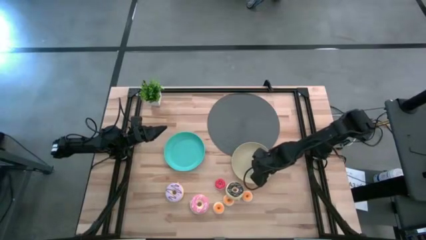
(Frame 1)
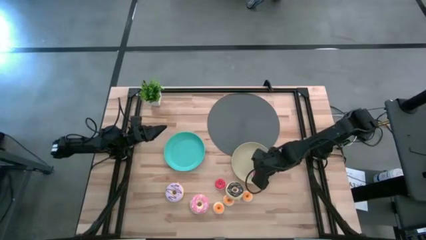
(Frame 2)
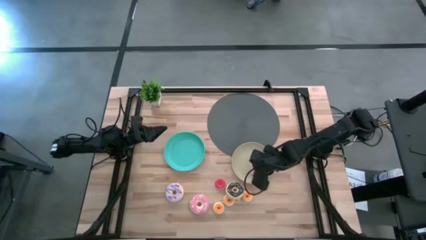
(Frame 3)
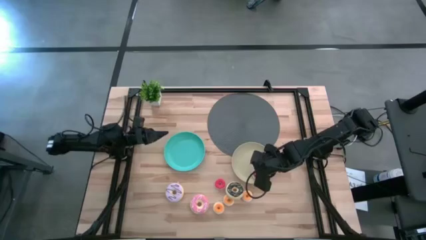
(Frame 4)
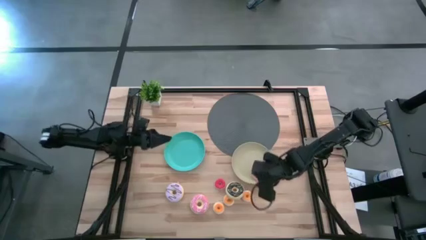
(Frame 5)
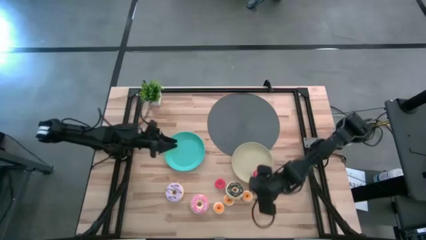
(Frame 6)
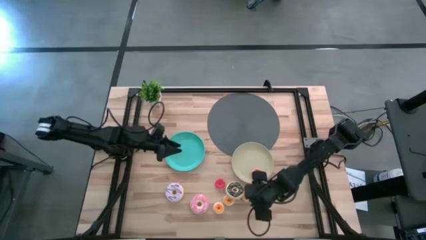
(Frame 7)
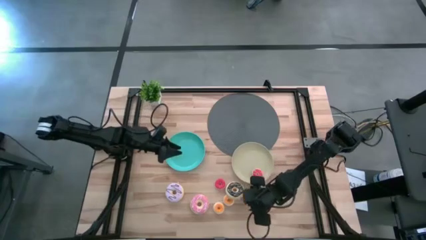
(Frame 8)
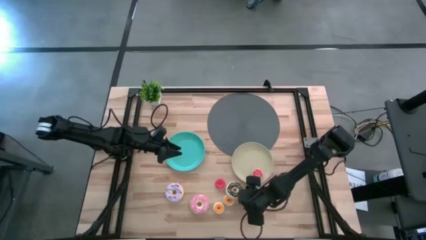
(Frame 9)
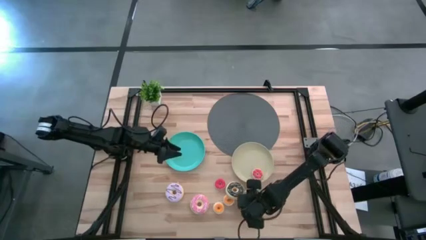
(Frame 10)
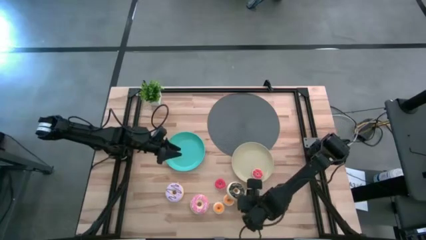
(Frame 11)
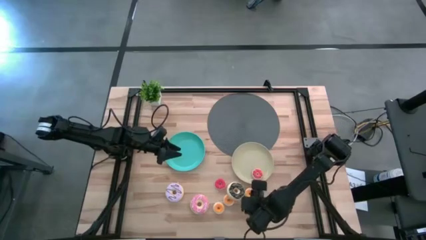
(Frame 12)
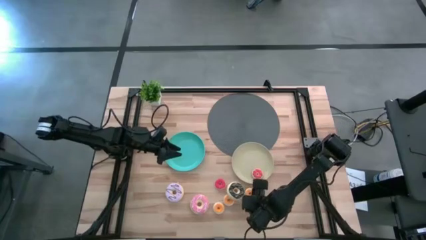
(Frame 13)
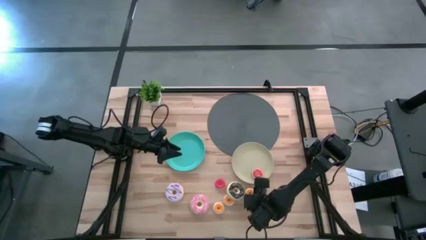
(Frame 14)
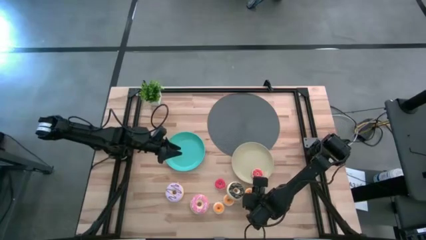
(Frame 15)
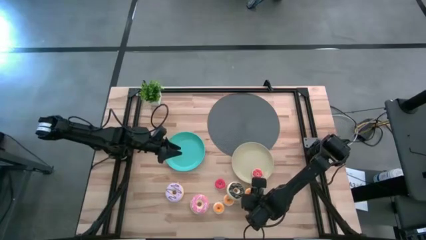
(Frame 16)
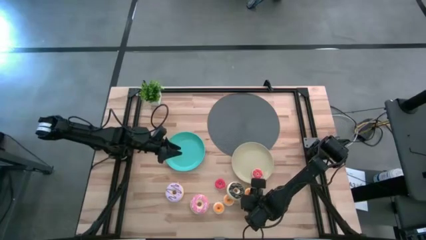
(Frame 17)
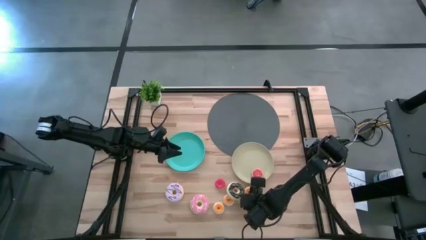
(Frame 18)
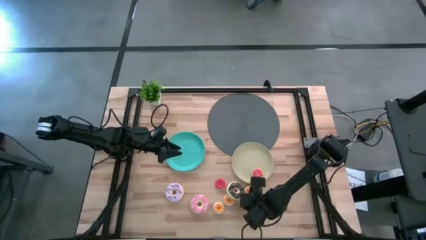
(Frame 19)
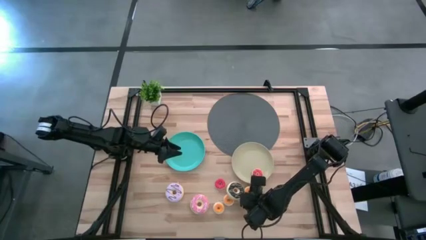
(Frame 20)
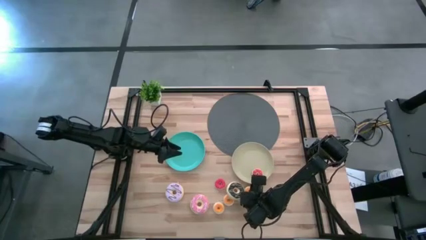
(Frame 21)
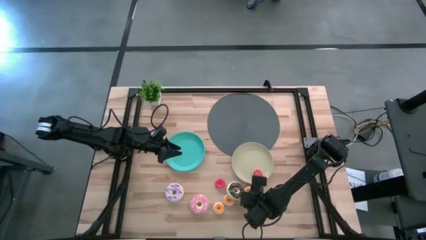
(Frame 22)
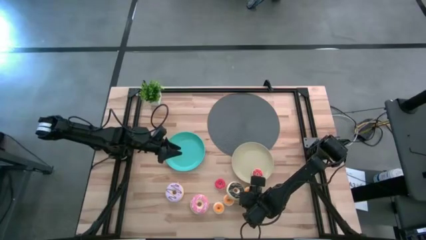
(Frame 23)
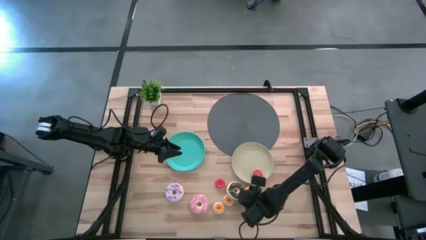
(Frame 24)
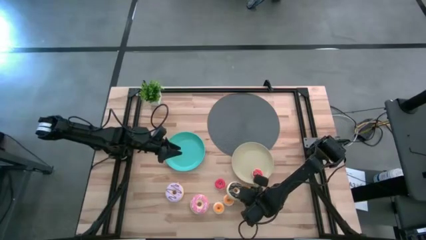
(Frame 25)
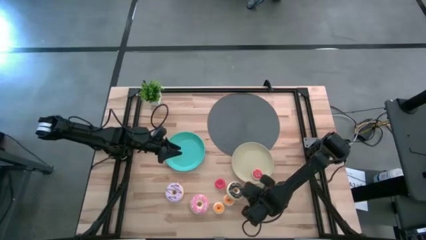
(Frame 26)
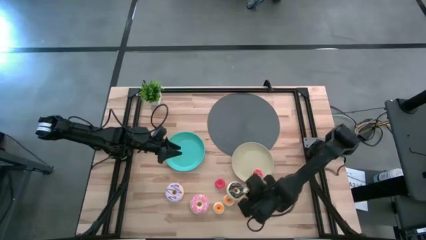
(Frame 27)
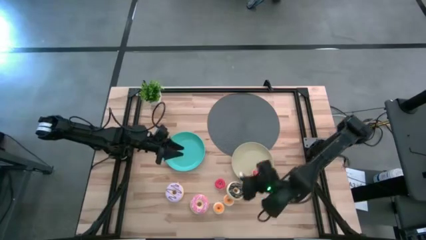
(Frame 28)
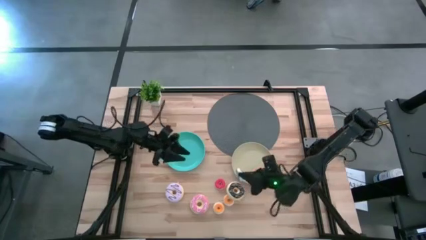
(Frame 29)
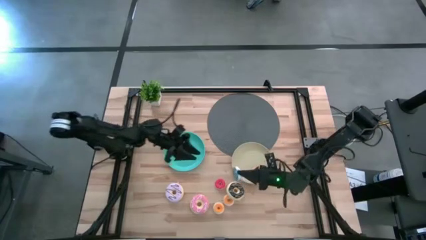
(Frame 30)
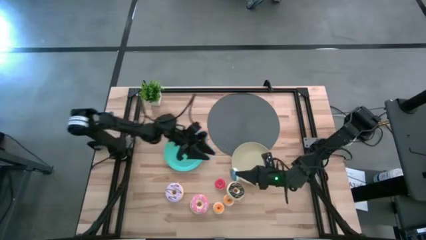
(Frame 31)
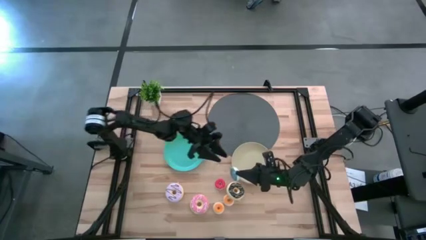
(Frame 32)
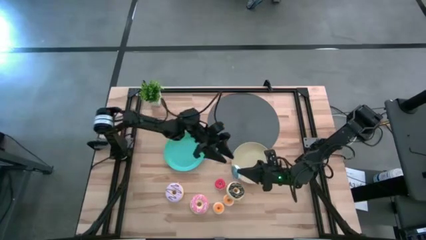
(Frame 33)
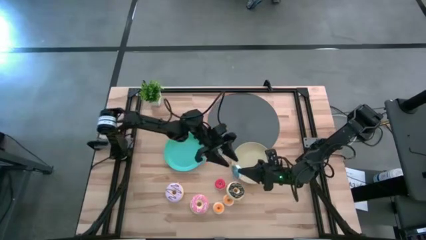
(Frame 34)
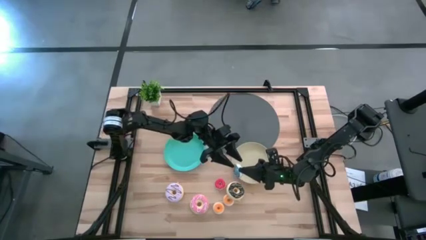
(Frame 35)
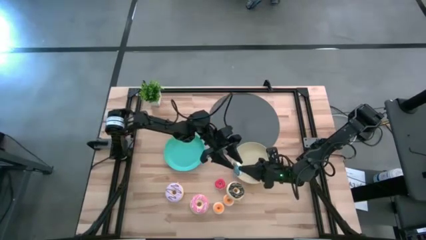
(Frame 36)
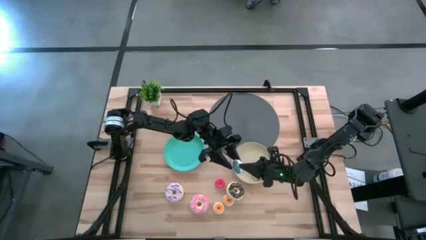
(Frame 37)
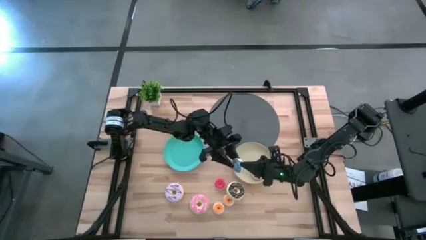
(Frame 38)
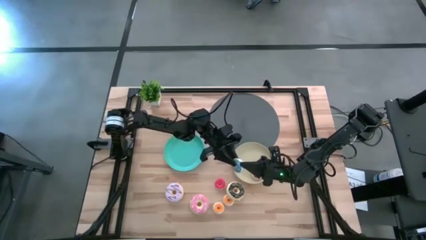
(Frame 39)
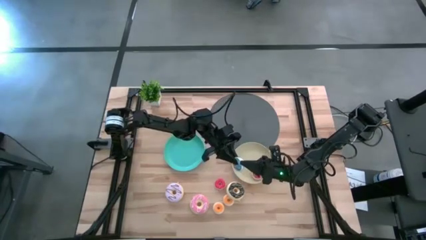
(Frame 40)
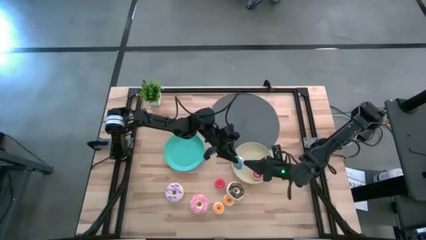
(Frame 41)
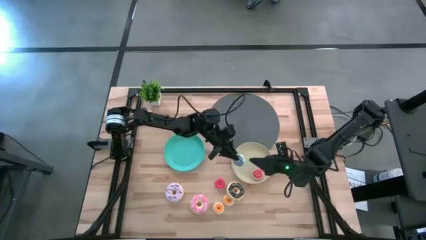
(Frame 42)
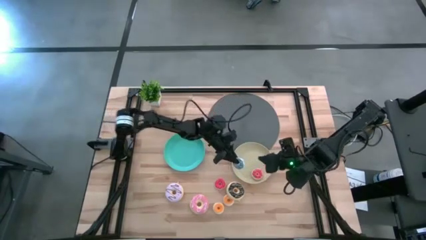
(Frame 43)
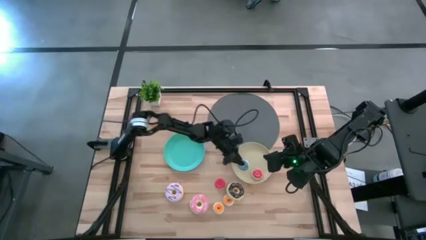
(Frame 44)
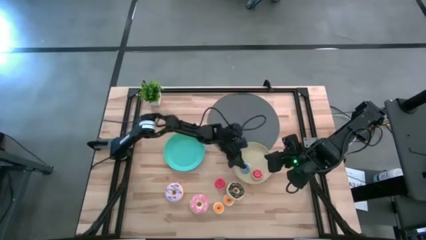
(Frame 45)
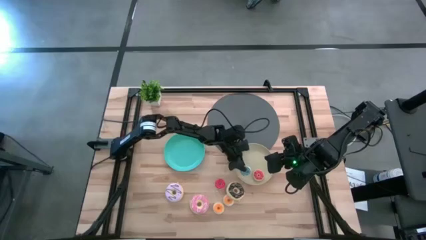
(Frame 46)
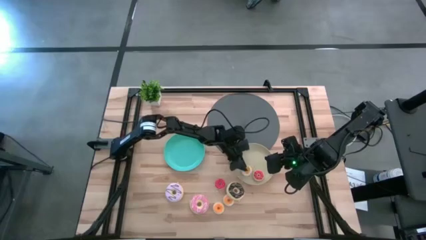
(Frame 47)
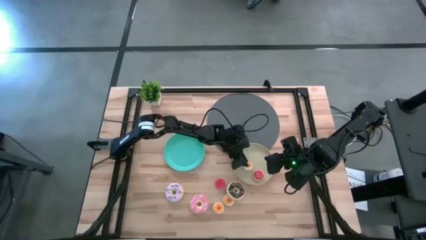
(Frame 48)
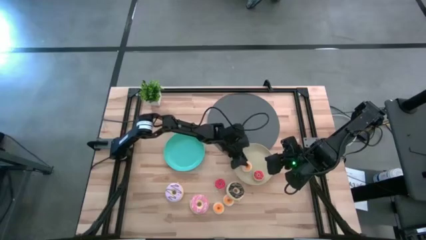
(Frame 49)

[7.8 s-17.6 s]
Task: Pick & Place donuts
Put the small blue doughnut on the brown plate

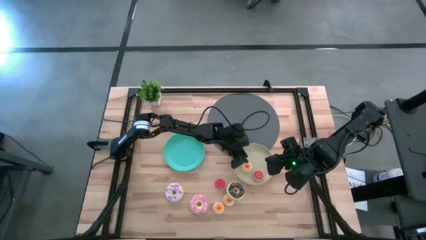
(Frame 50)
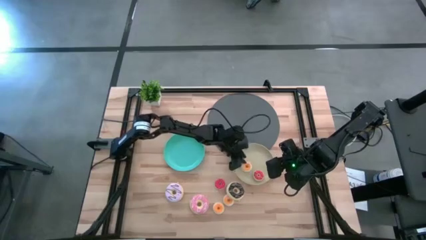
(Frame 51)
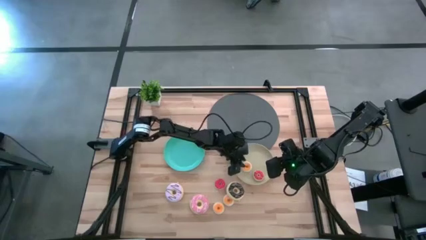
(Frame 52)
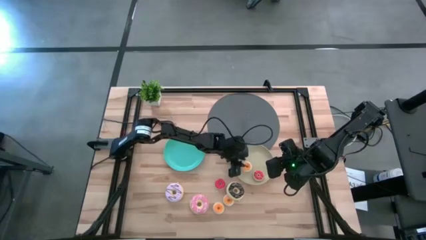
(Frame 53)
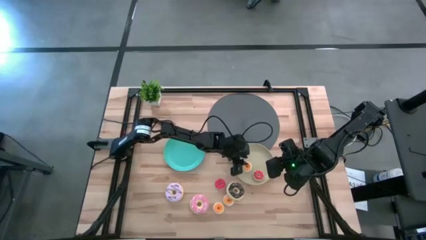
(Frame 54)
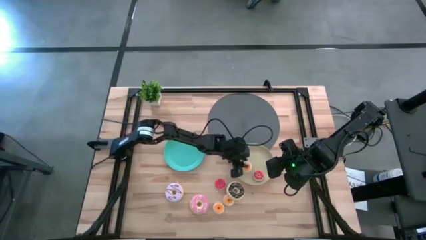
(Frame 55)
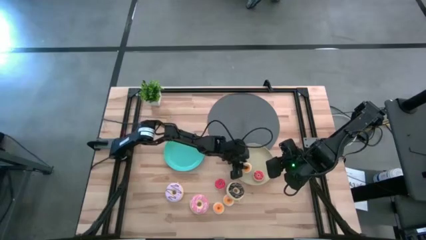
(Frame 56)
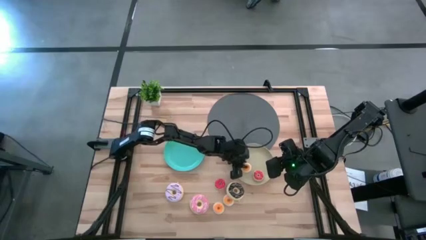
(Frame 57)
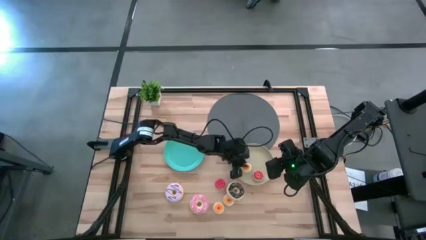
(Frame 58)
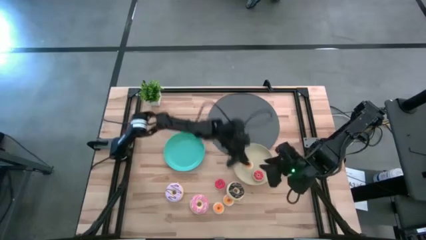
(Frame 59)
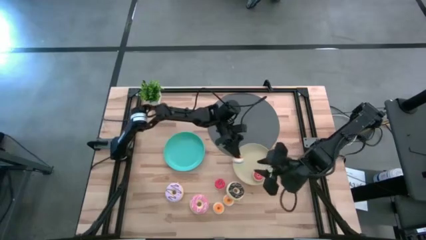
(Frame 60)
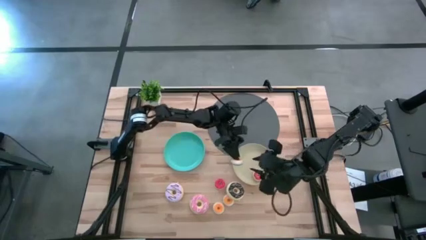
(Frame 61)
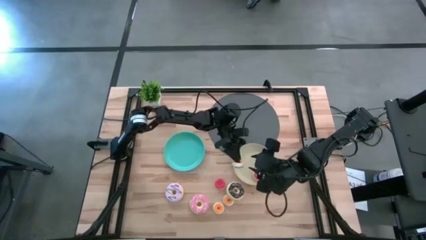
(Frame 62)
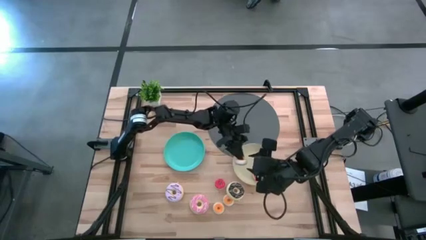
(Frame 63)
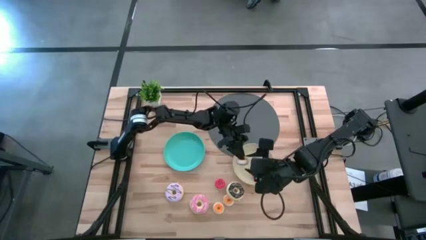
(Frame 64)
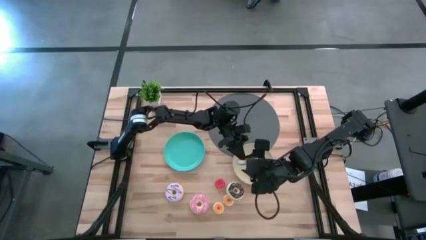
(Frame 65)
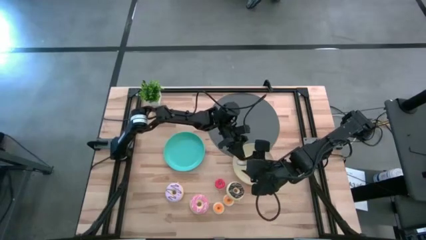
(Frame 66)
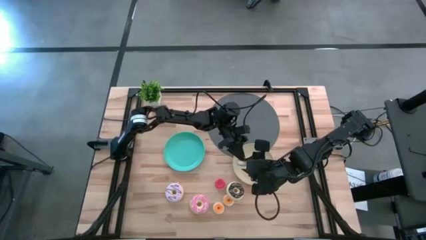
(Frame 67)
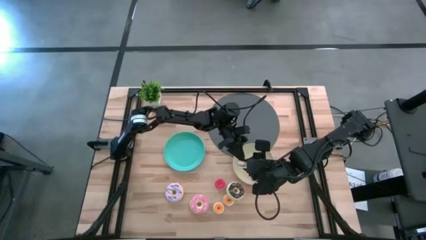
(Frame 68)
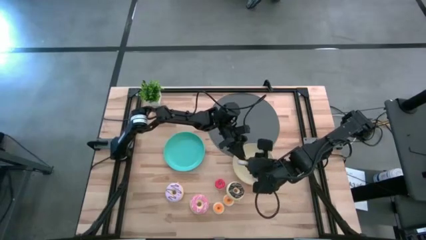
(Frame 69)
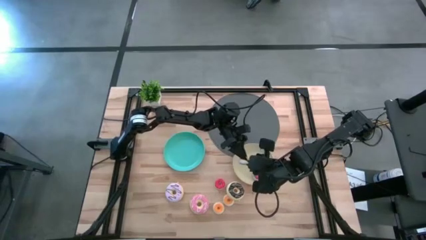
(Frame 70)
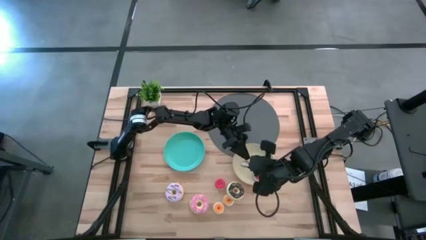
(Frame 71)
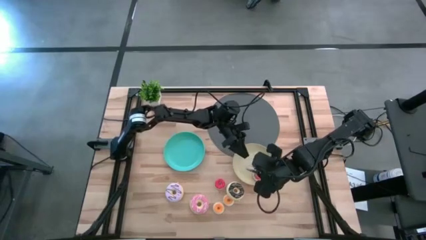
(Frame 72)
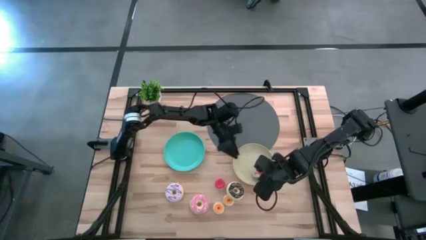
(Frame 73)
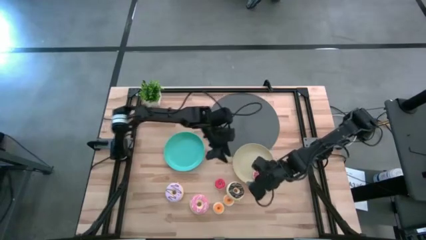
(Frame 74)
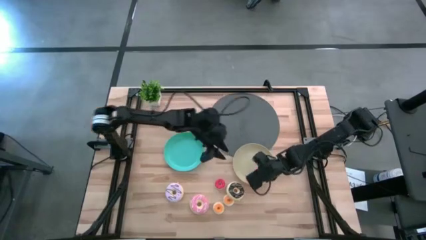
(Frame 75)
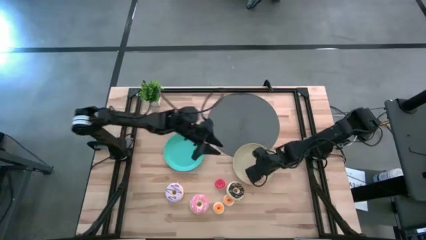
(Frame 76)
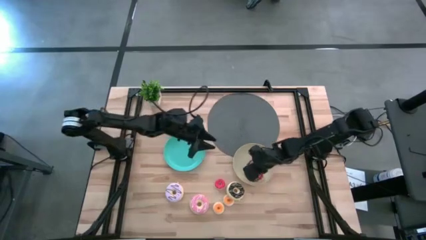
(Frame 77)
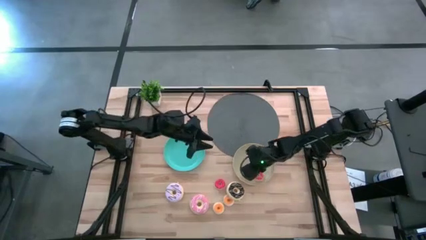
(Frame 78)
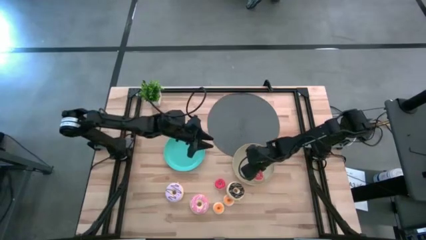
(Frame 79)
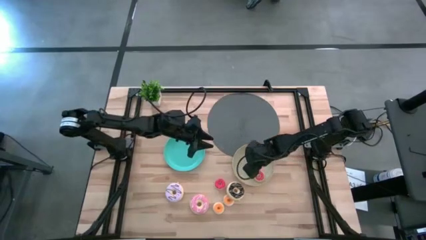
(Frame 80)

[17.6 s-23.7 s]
Put the small blue doughnut on the brown plate

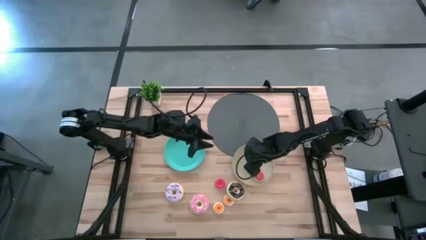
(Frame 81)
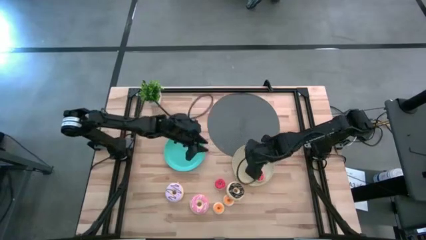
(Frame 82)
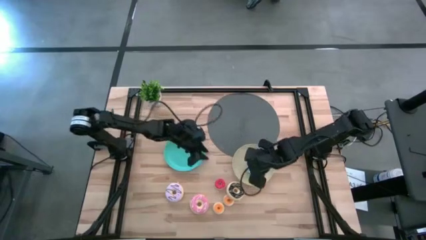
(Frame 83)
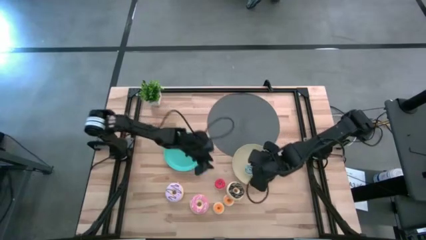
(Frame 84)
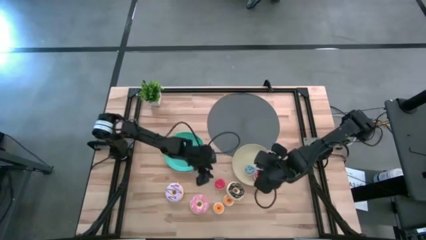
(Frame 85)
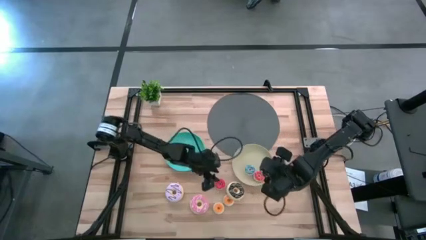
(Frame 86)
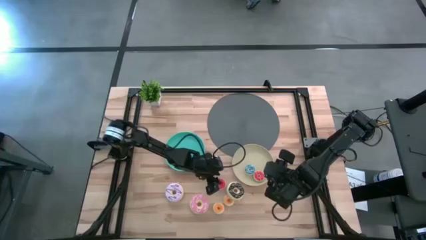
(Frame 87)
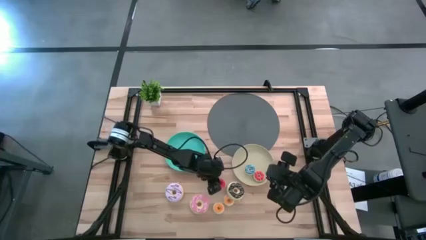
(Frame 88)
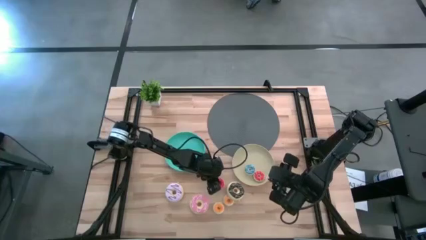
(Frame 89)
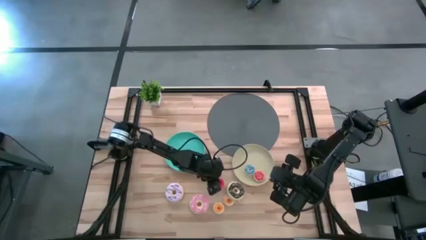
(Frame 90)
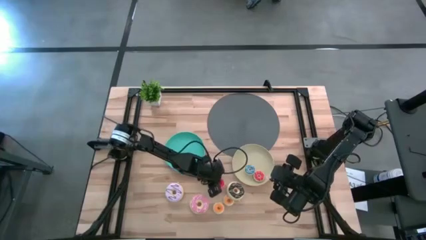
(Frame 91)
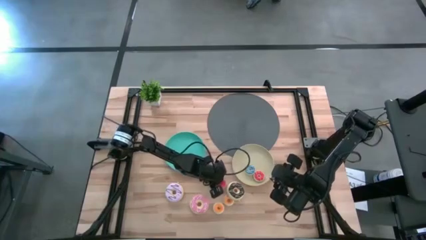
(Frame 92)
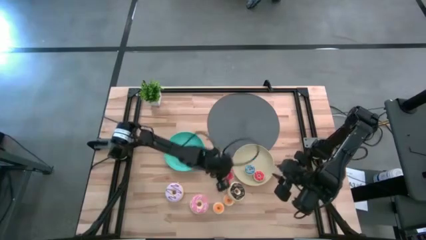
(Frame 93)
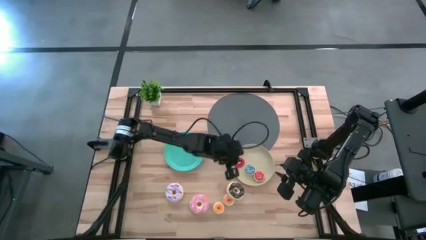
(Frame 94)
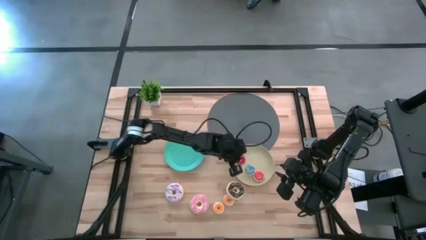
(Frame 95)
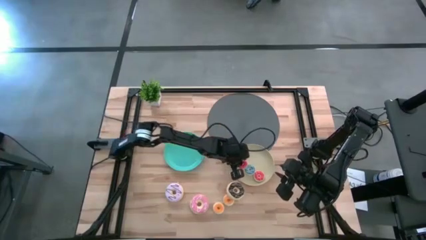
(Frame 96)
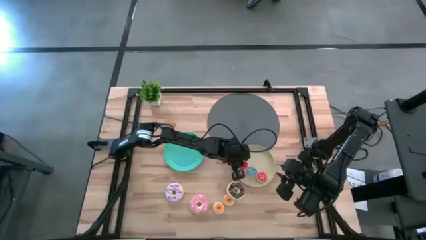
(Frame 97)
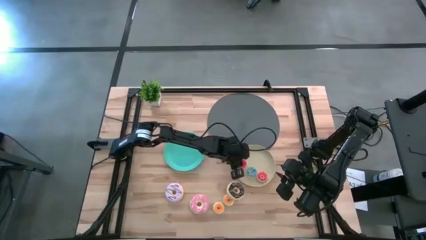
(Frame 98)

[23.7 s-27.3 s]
Put the small red doughnut on the brown plate
